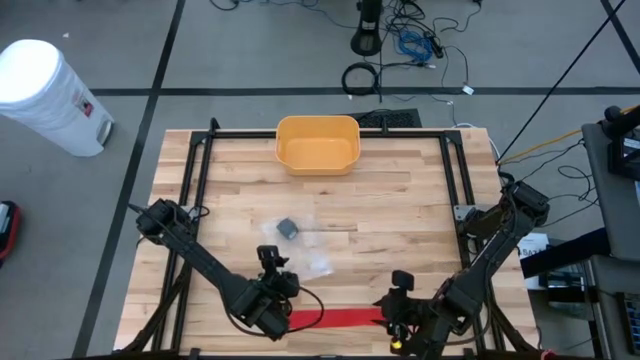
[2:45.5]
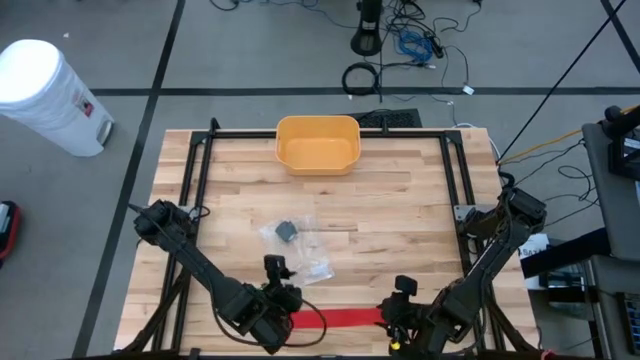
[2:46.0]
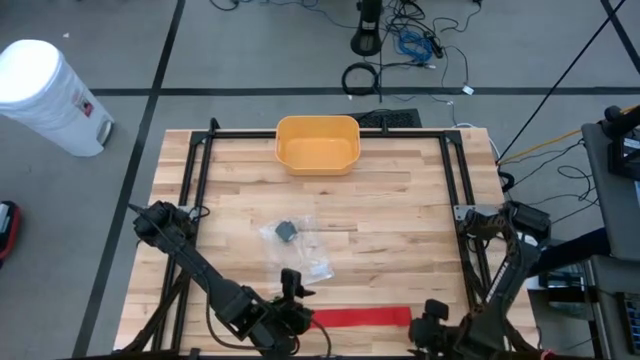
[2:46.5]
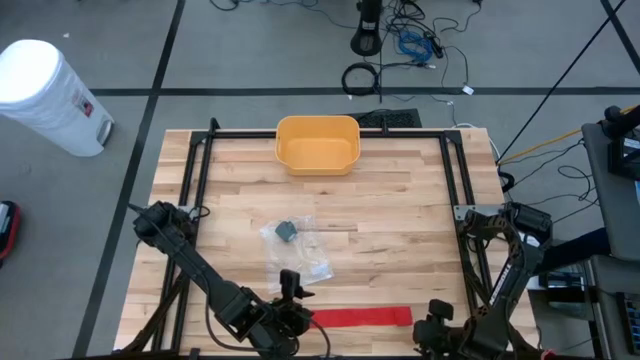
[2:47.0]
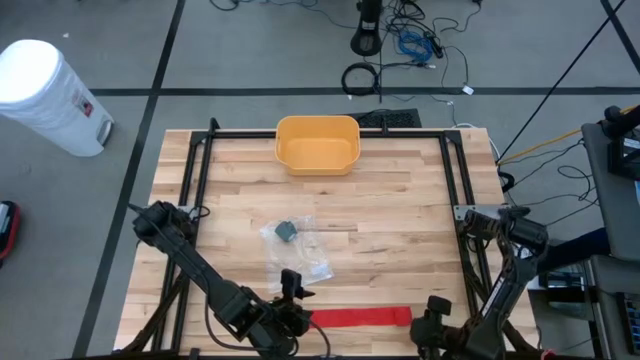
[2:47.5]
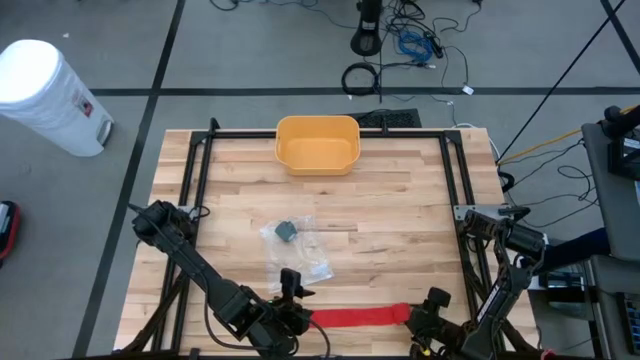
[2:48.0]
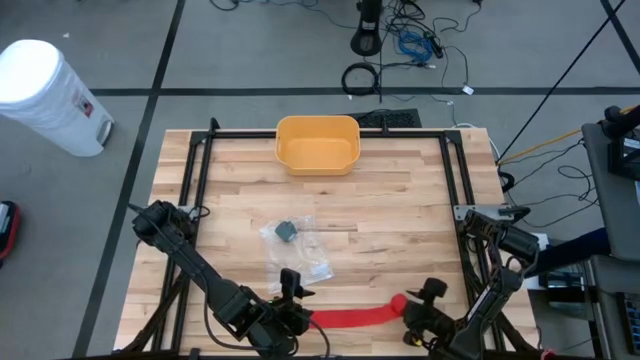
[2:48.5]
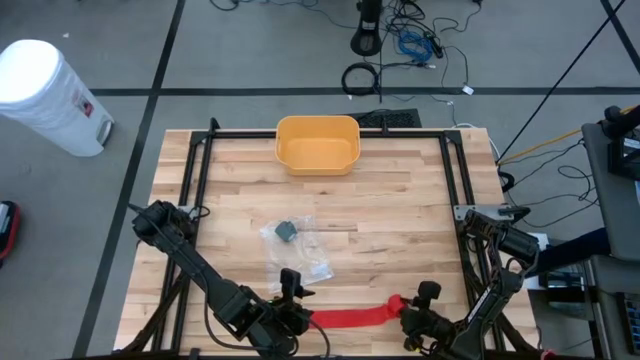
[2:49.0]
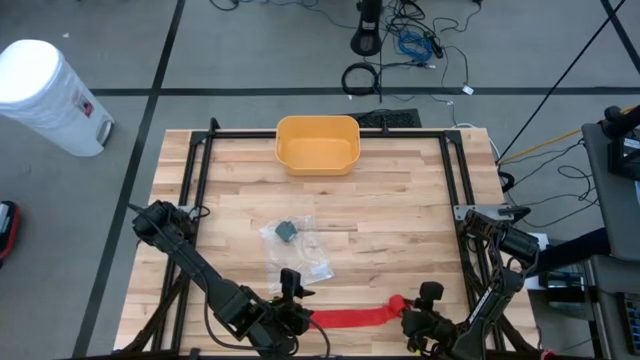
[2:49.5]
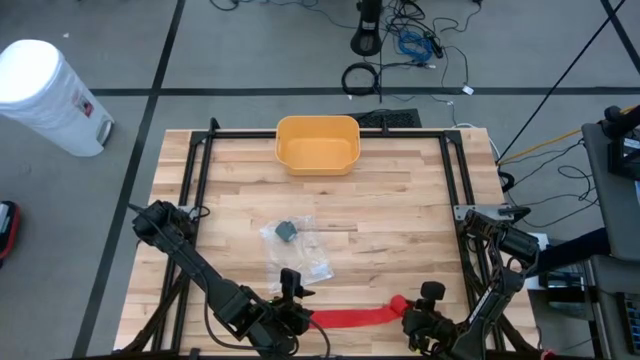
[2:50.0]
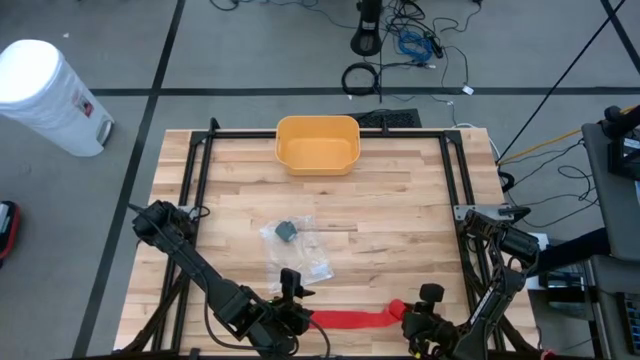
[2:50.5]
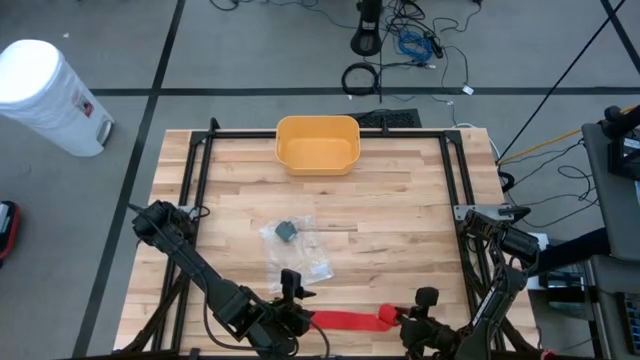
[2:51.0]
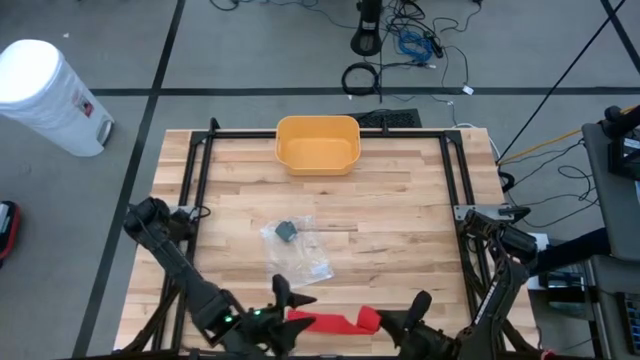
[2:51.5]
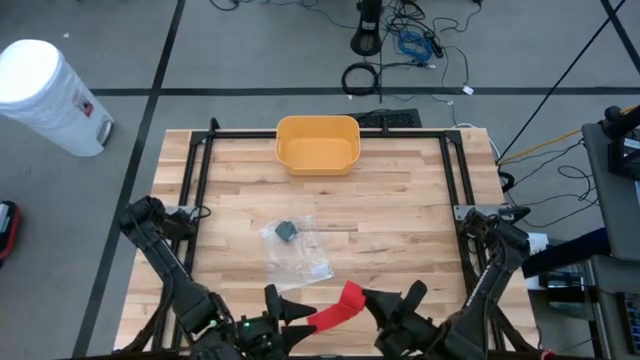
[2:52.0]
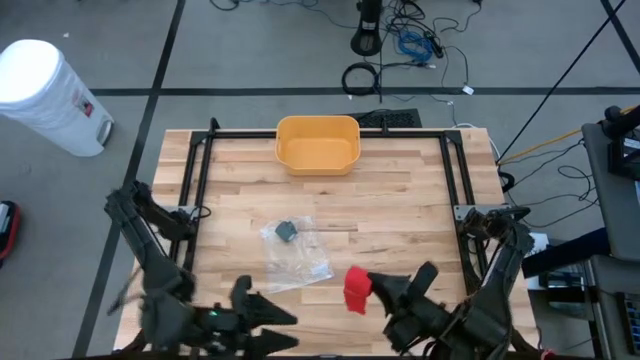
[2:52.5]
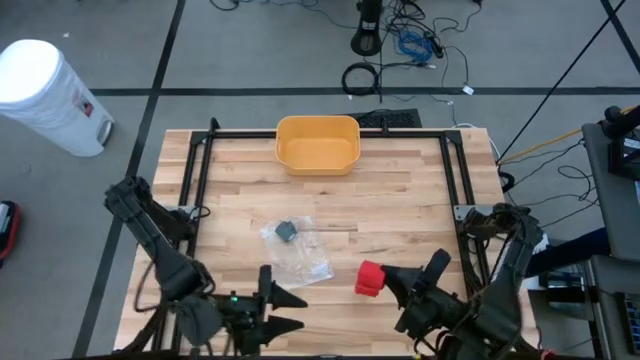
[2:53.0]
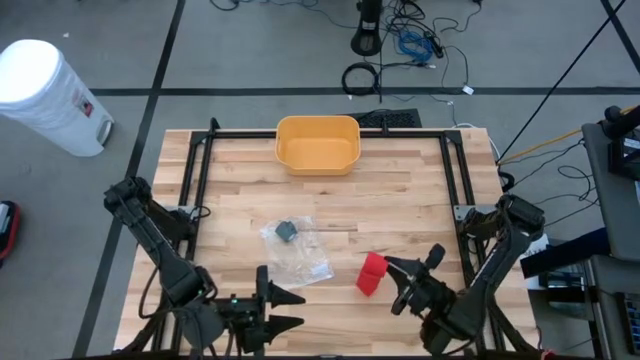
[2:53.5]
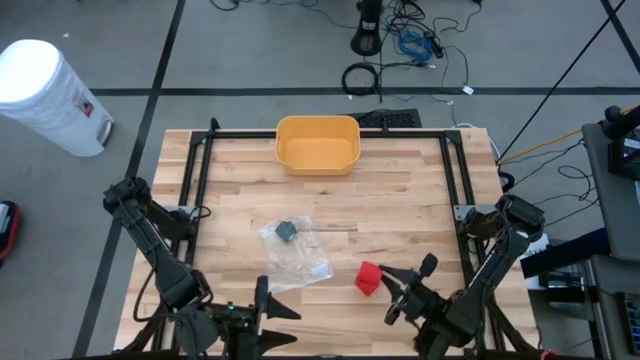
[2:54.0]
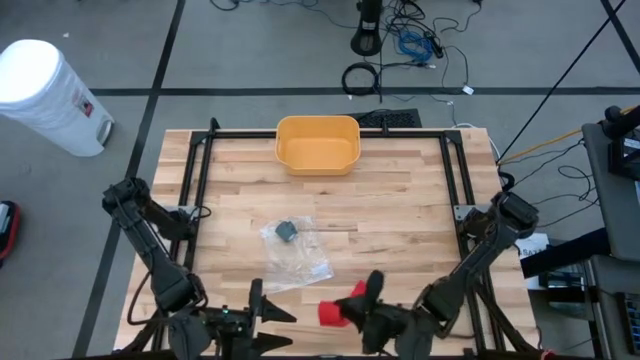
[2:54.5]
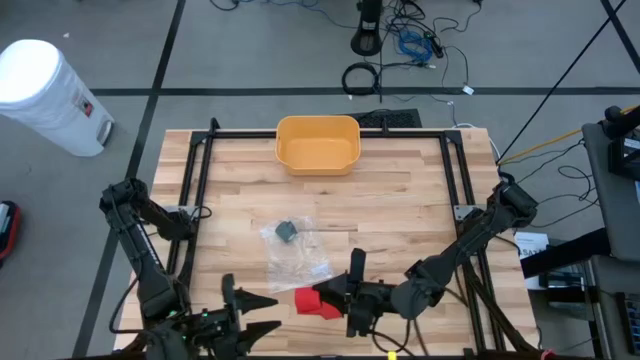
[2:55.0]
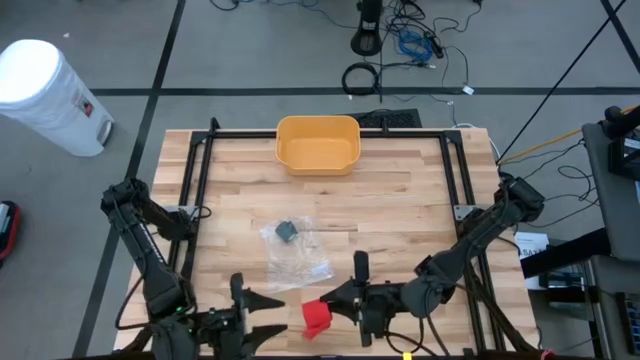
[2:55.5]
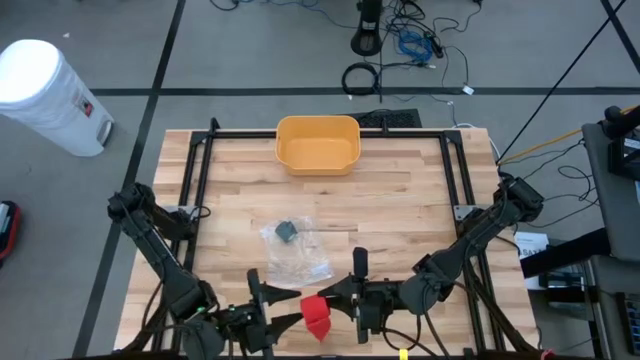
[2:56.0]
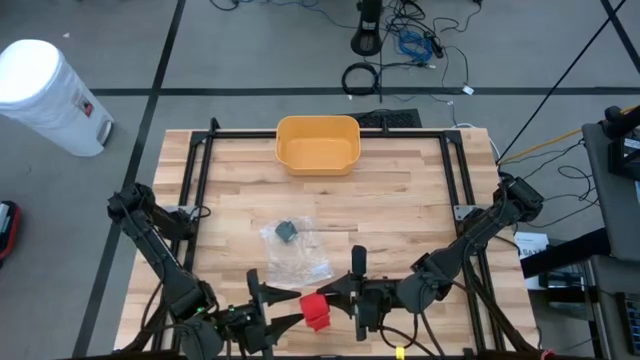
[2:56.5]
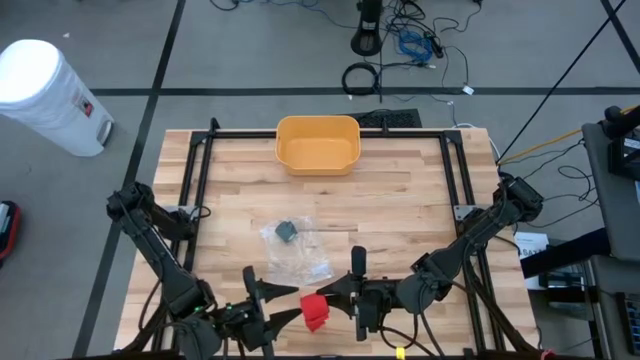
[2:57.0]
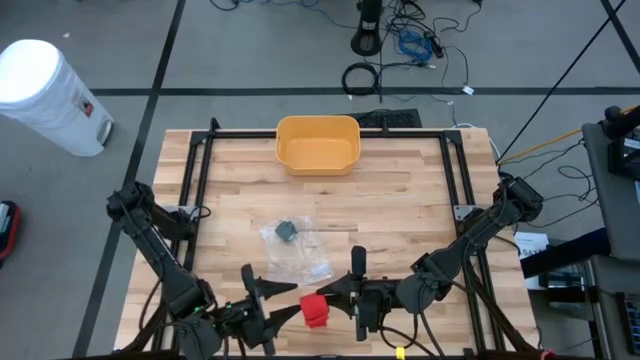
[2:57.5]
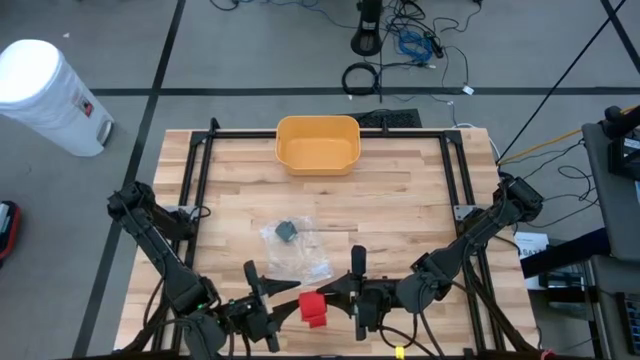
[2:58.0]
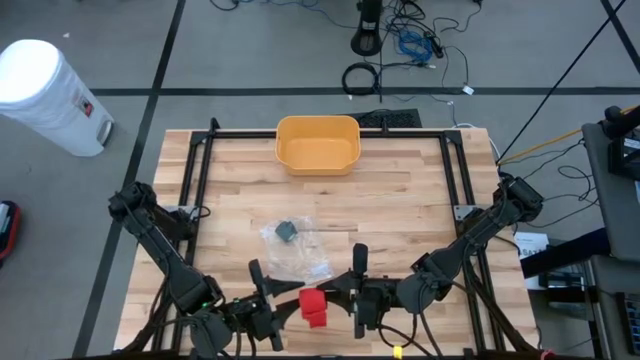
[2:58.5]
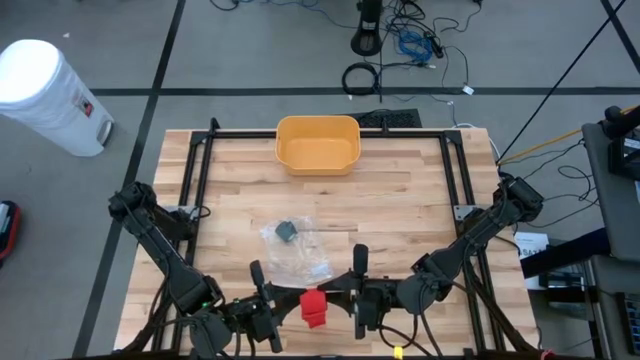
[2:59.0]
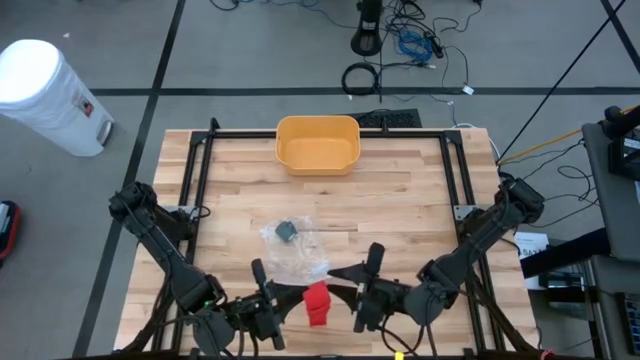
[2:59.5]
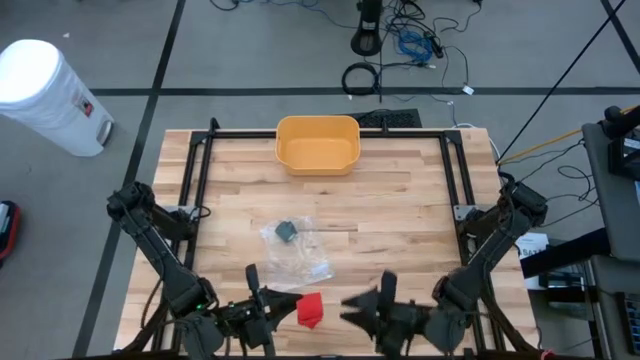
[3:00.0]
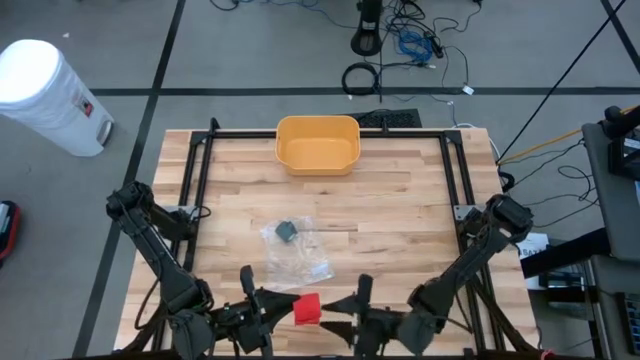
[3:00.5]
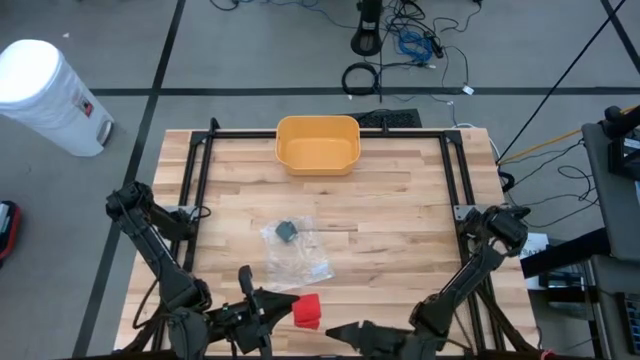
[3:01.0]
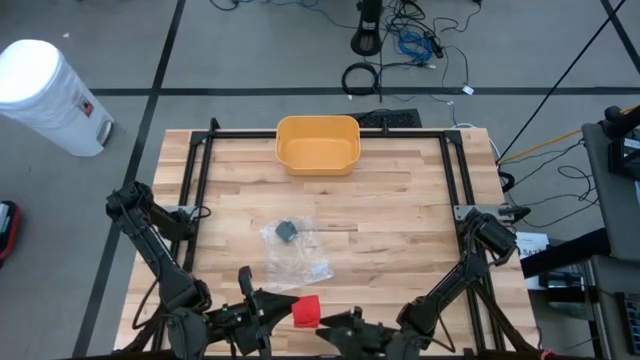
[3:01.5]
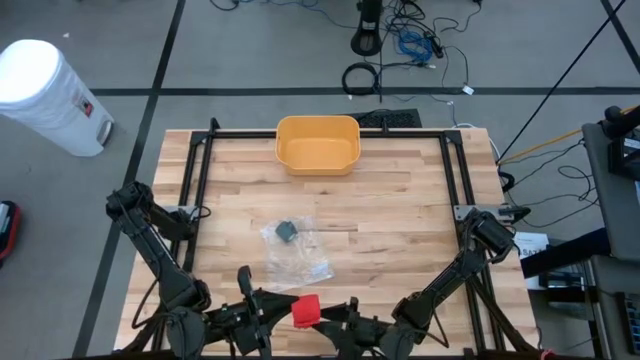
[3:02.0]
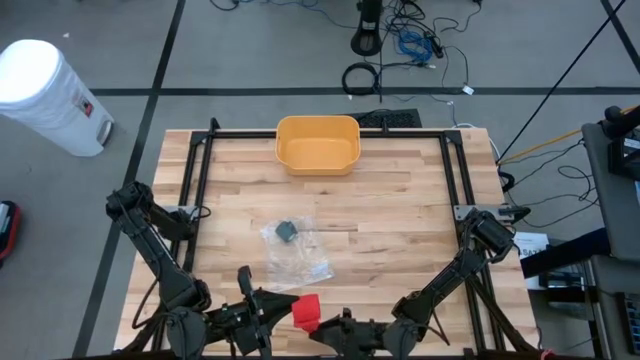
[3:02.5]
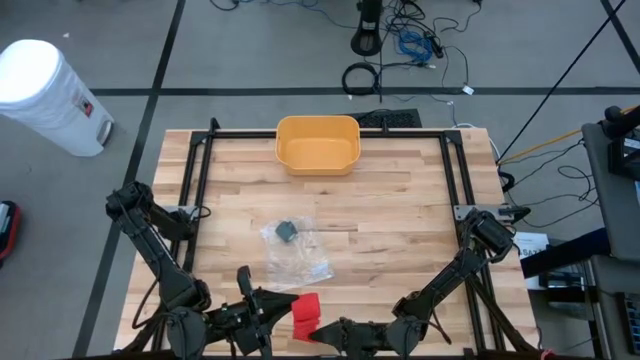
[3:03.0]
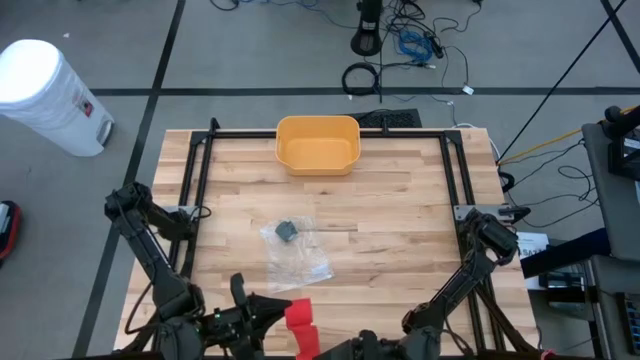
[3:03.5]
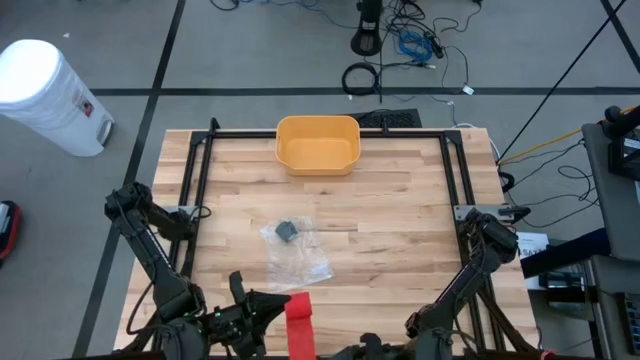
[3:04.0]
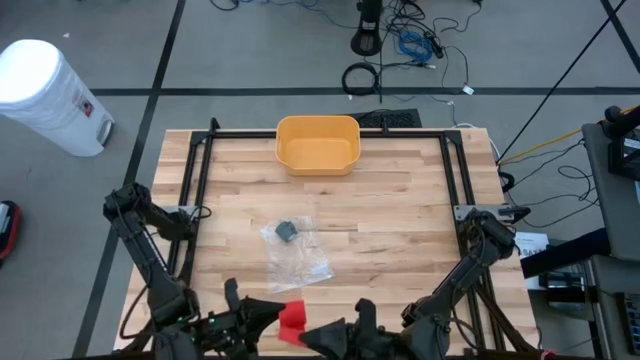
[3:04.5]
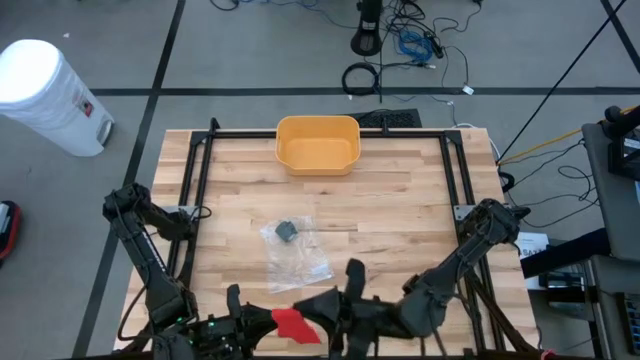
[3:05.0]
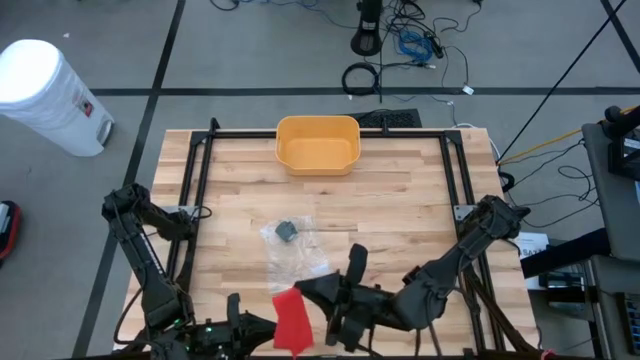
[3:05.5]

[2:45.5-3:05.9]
Task: Roll bandage
Roll the red bandage
